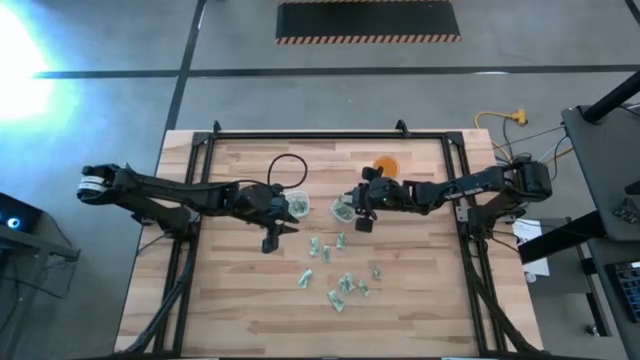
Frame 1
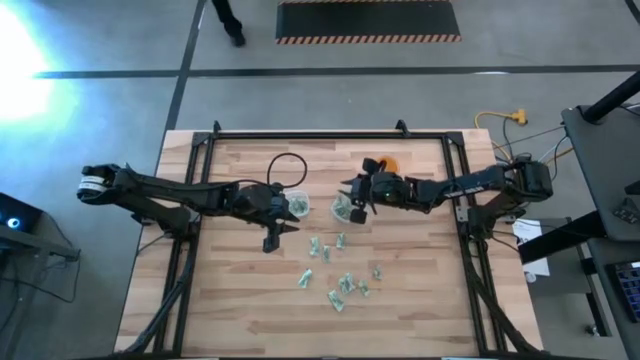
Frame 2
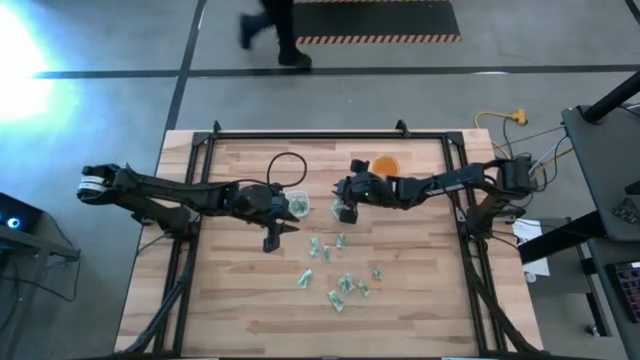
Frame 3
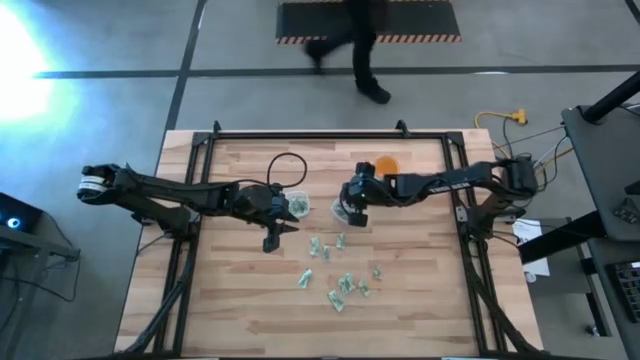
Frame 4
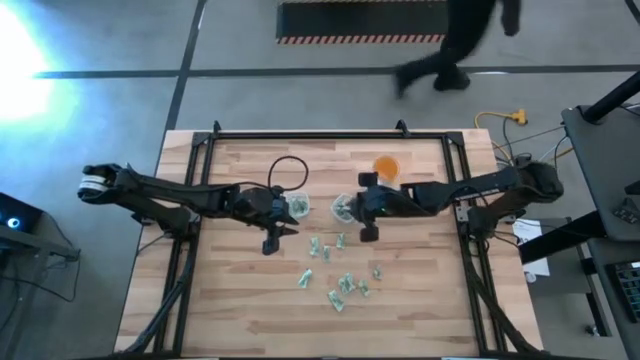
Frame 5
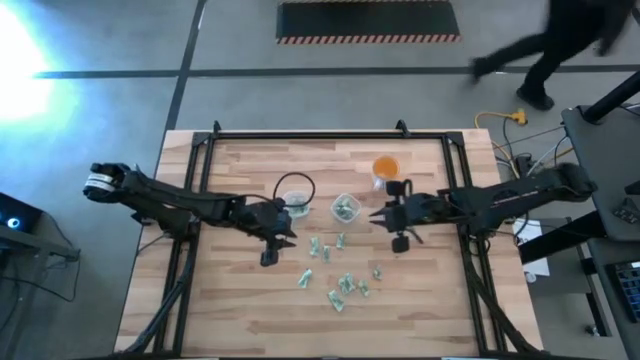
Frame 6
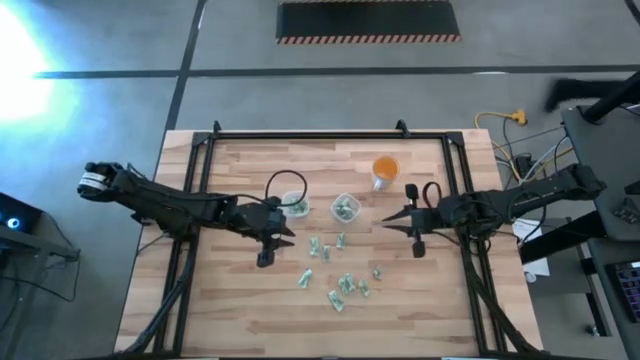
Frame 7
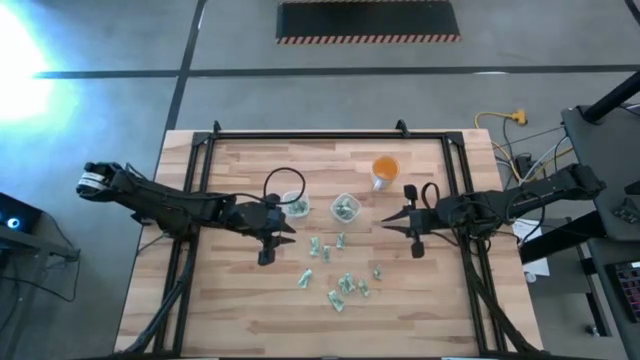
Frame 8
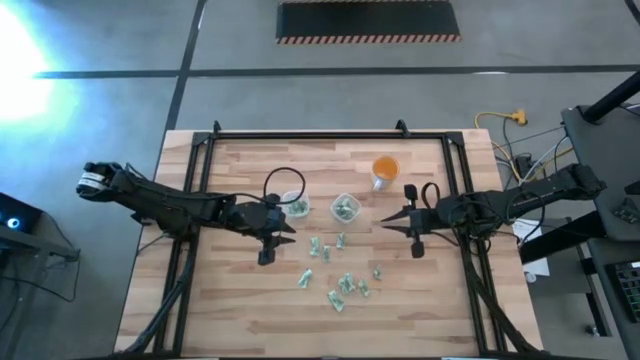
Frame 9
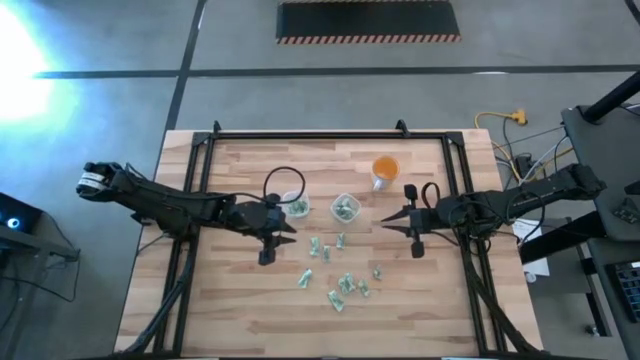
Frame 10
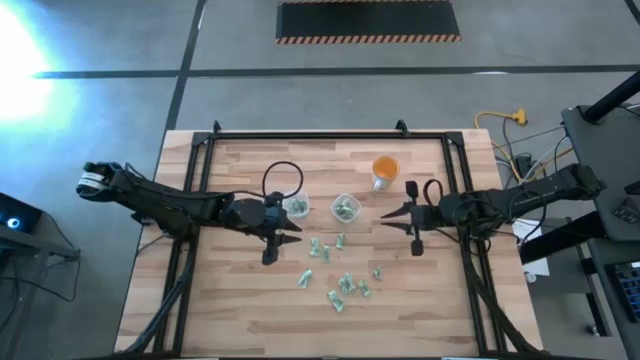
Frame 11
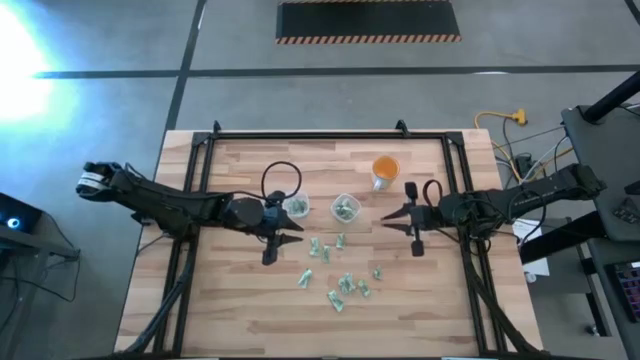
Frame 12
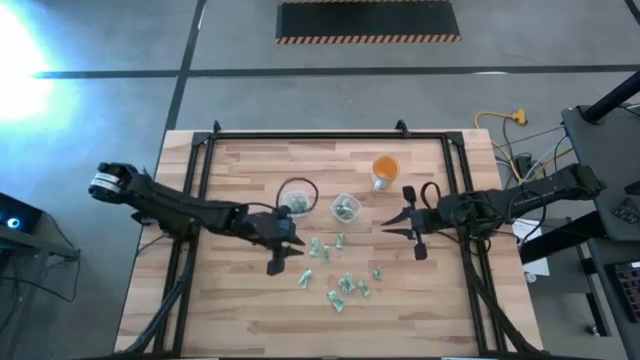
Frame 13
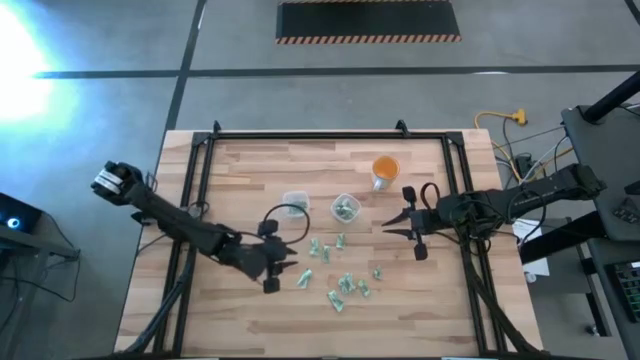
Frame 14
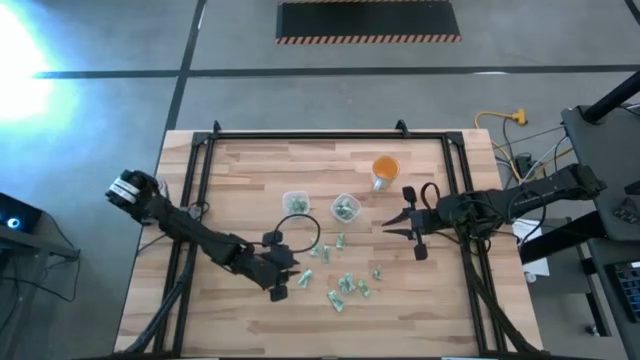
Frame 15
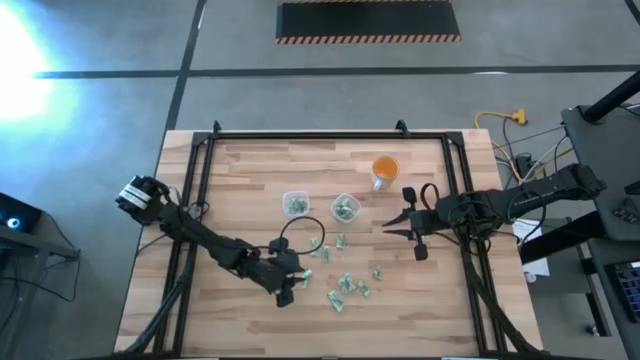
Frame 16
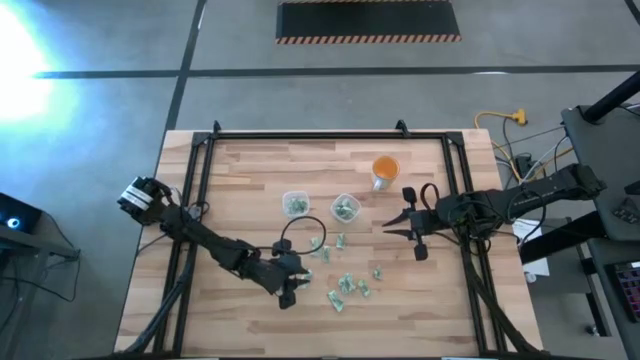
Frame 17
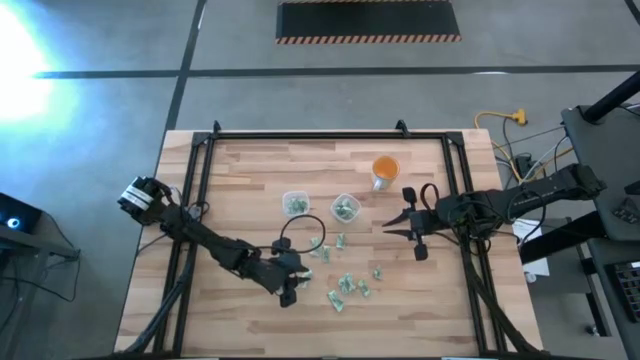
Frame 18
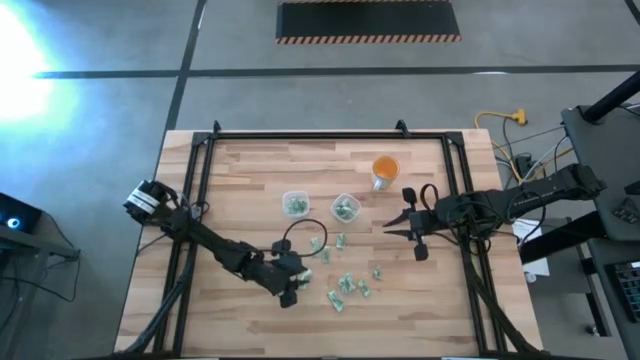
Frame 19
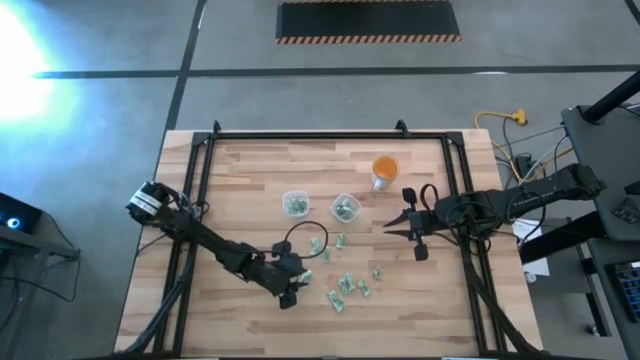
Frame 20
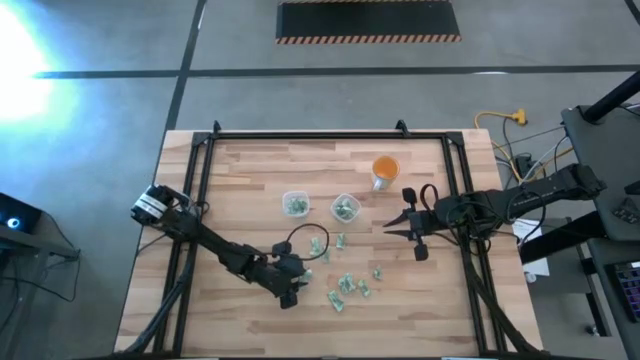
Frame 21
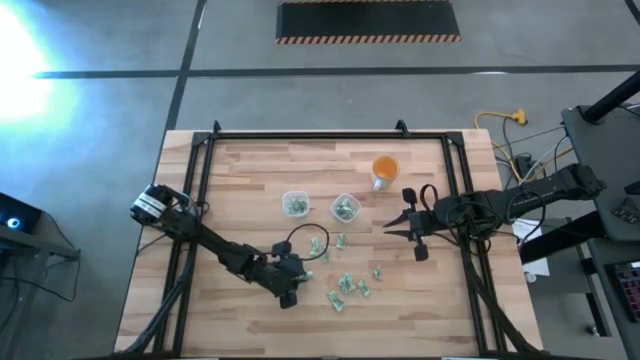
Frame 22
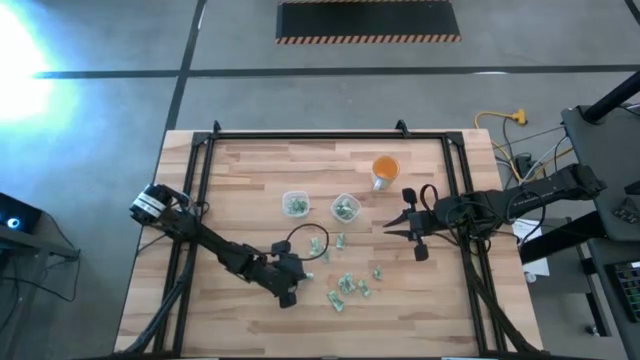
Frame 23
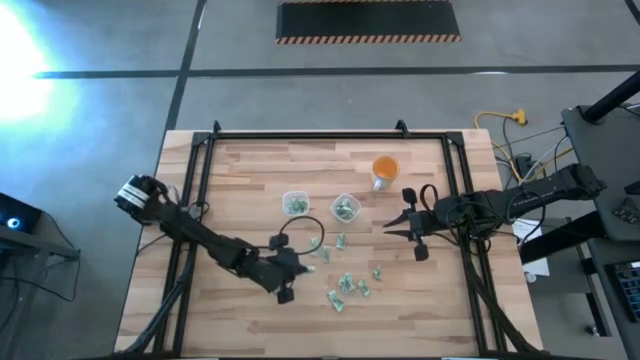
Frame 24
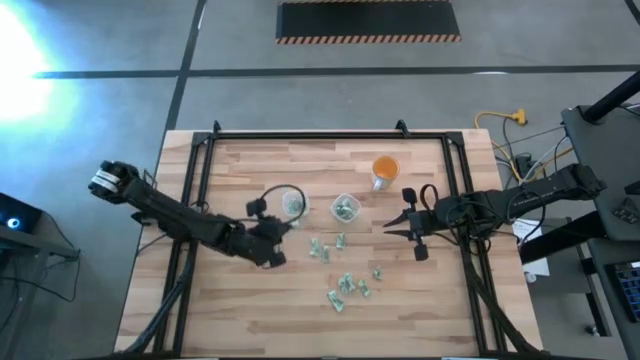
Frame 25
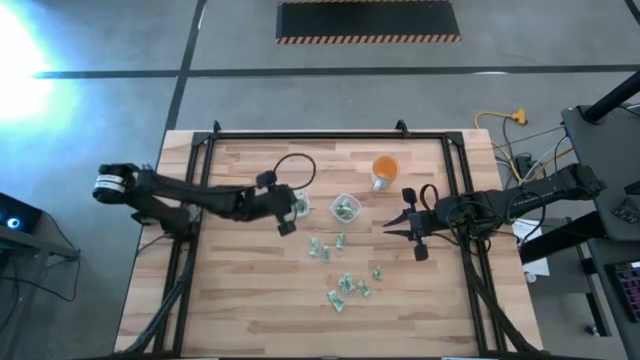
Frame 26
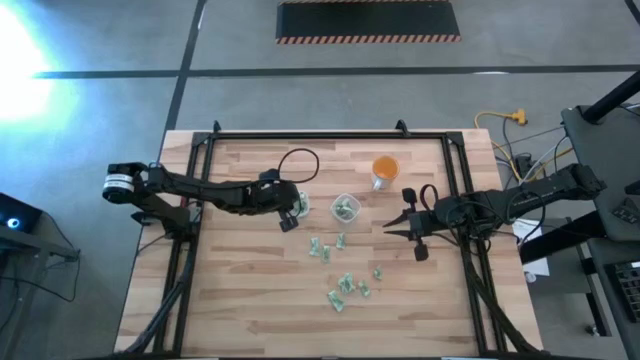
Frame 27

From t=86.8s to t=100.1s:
Task: Pick and place items into bin
Put the white stevia packet into the left transparent bin

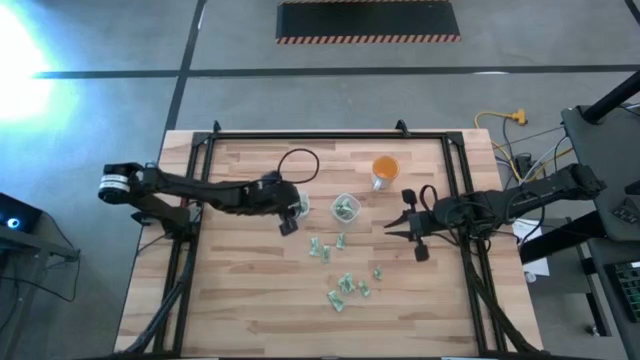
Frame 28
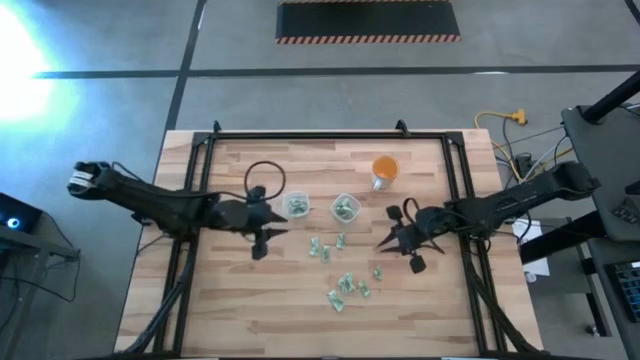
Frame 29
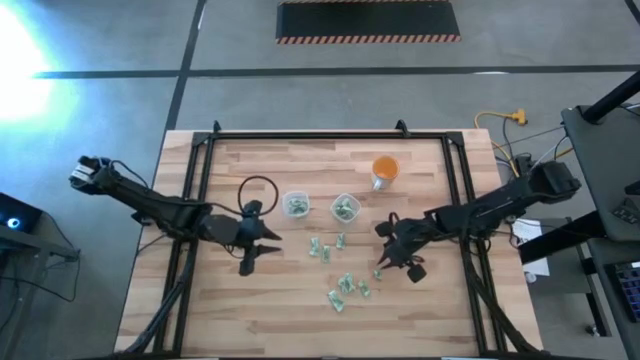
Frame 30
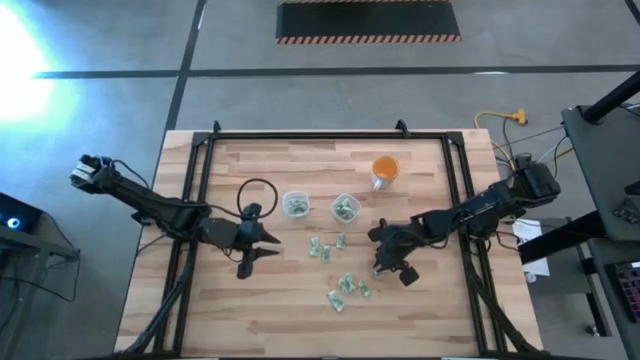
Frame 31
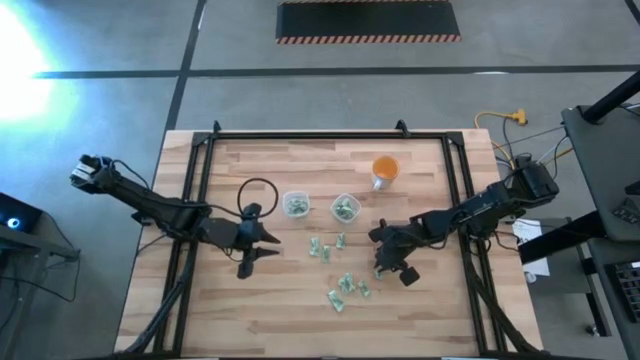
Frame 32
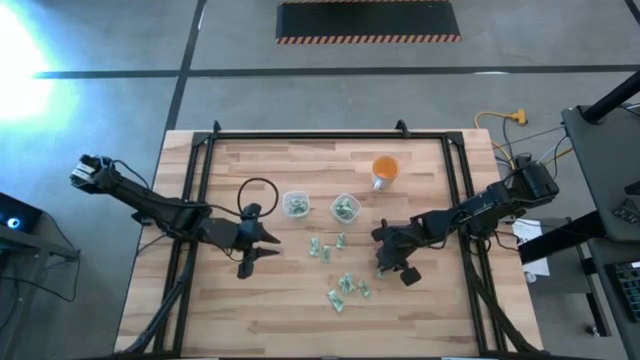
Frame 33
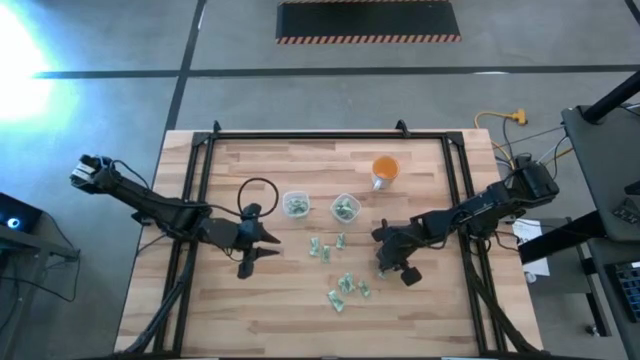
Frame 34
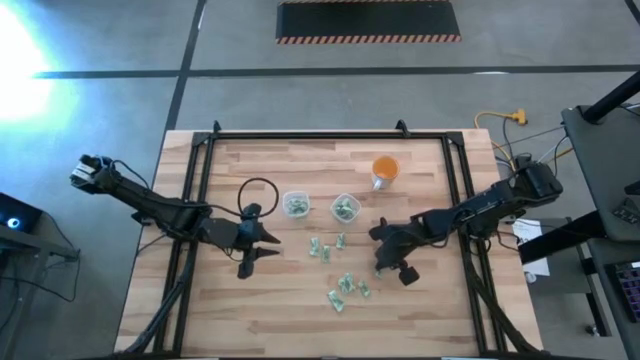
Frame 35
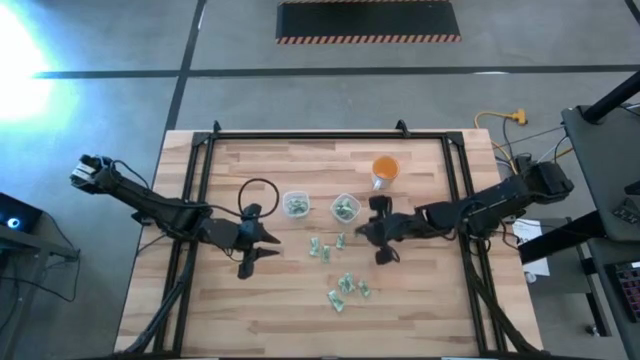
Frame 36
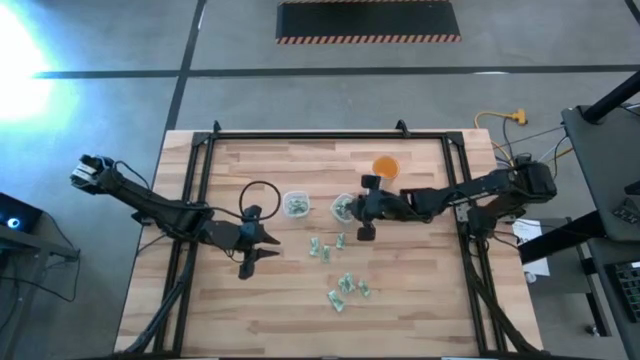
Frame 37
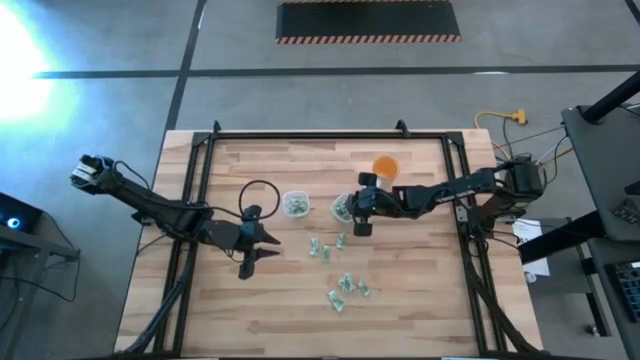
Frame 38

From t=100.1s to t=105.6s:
Put the white stevia packet into the right transparent bin

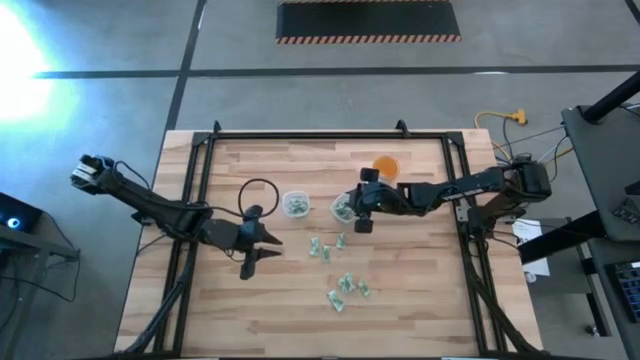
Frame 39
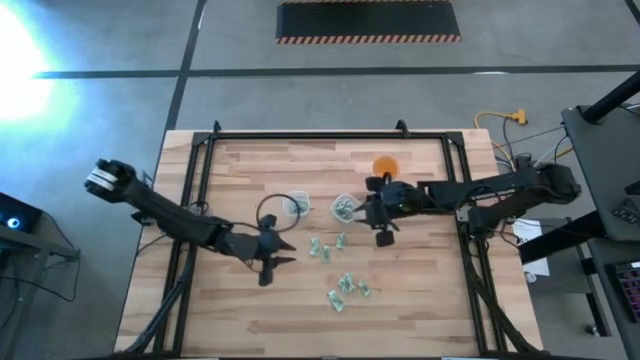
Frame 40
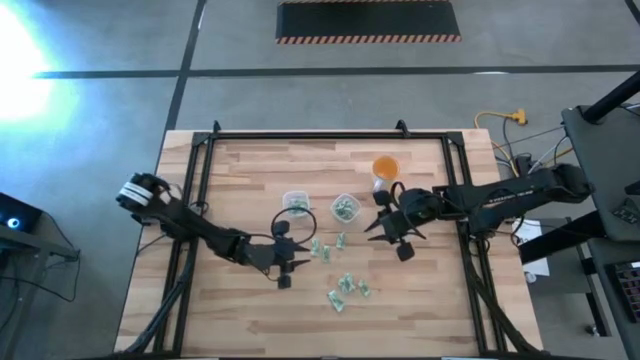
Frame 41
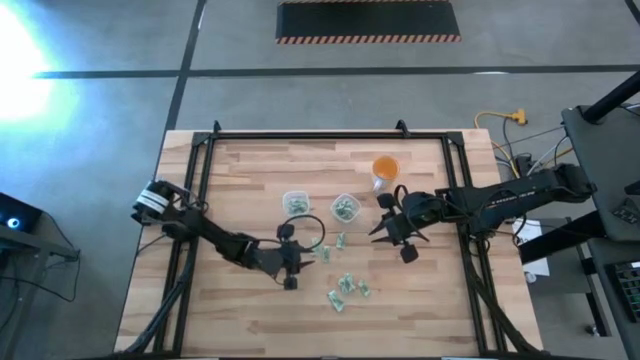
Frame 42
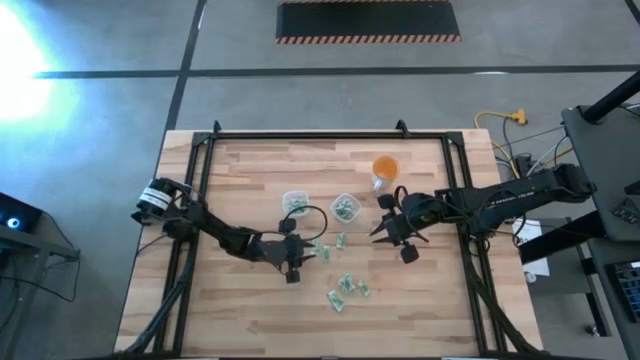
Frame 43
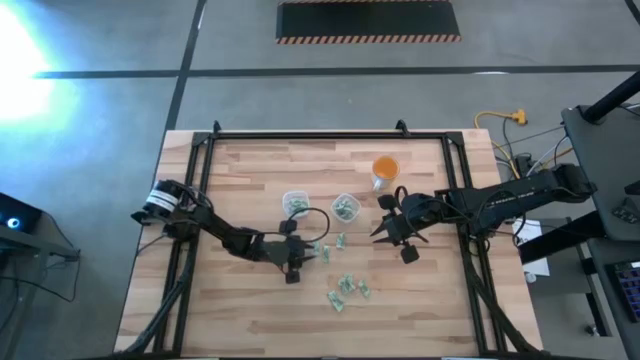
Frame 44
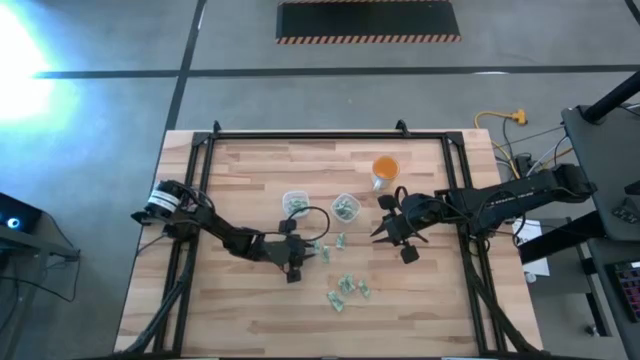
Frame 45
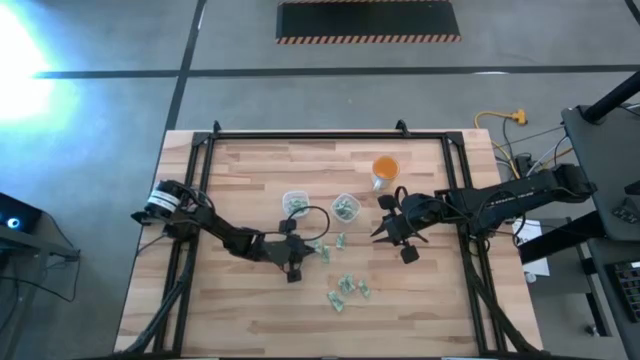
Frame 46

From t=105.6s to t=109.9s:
Put the white stevia packet into the left transparent bin
